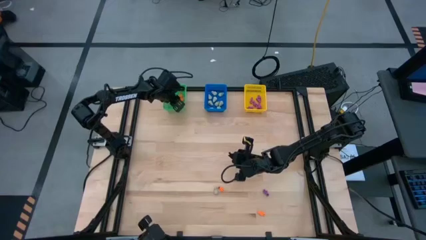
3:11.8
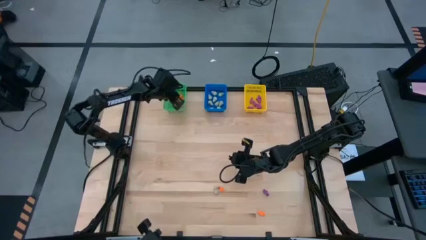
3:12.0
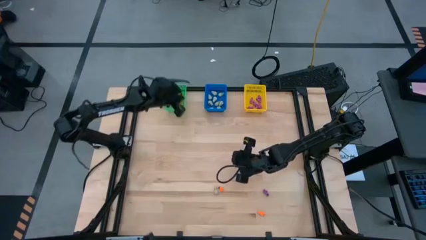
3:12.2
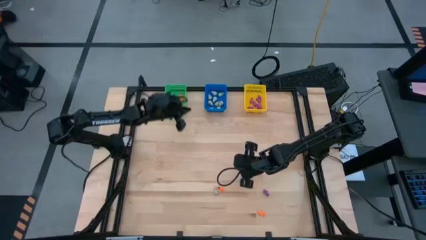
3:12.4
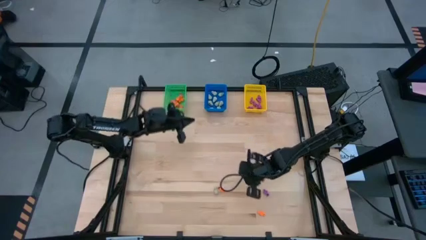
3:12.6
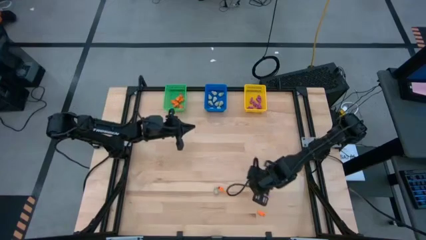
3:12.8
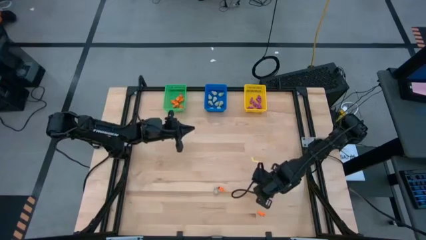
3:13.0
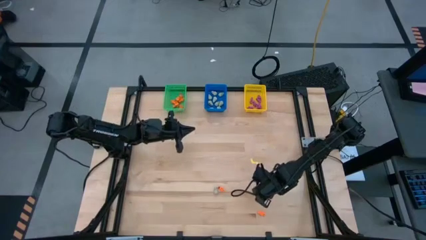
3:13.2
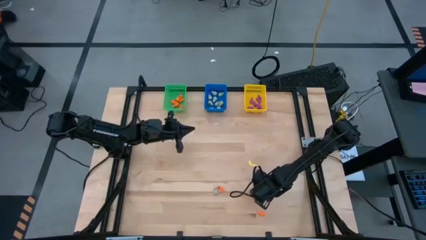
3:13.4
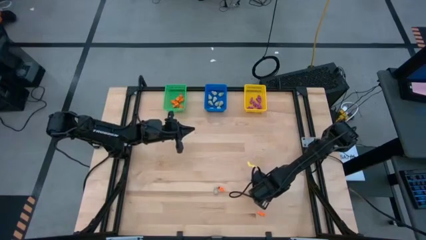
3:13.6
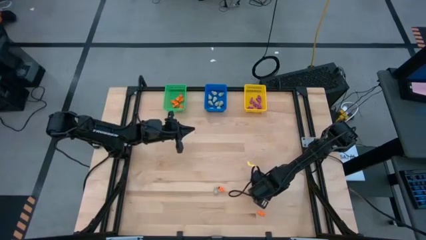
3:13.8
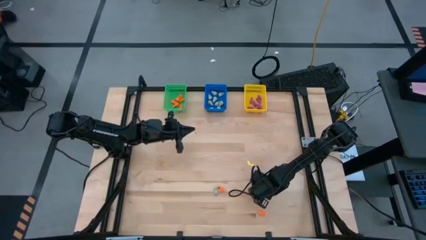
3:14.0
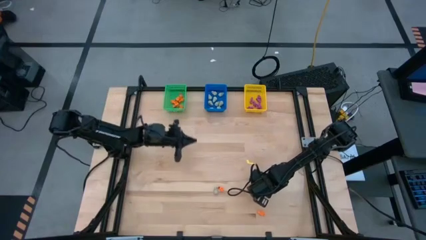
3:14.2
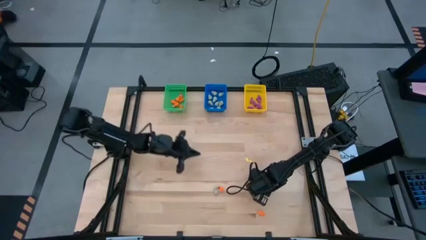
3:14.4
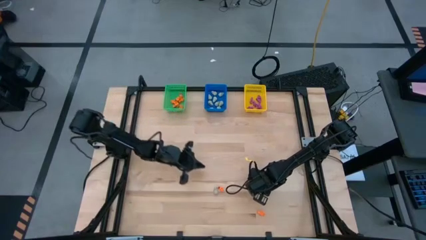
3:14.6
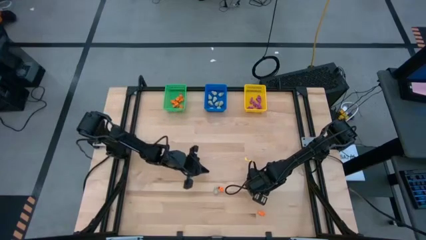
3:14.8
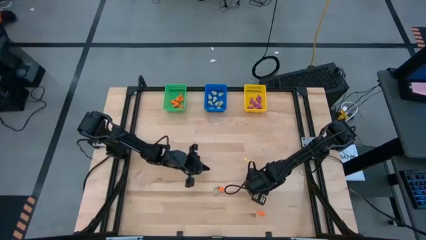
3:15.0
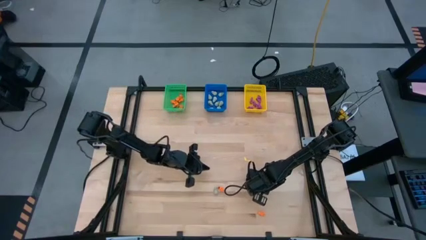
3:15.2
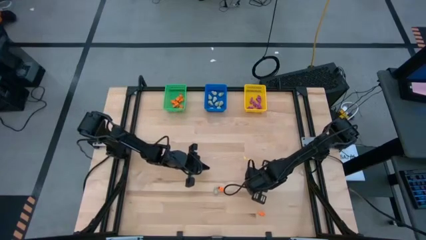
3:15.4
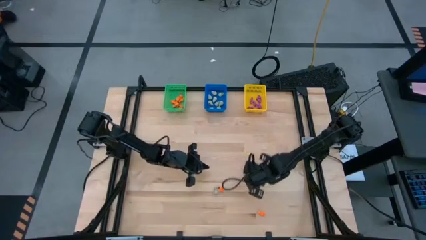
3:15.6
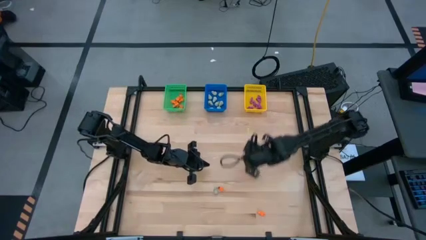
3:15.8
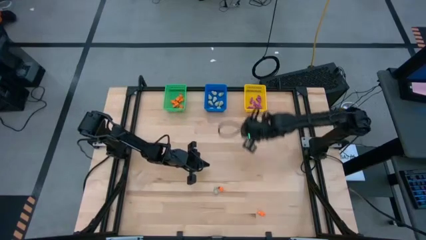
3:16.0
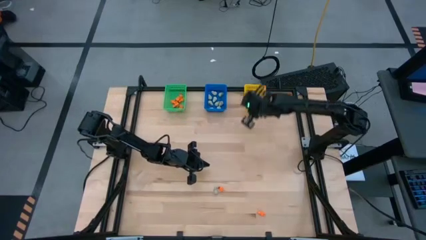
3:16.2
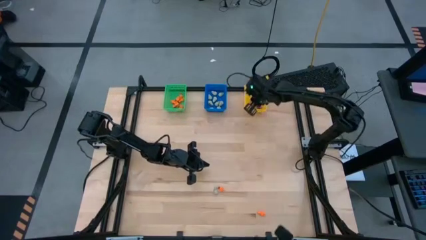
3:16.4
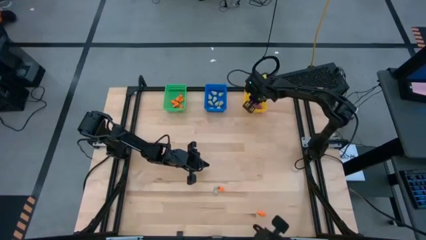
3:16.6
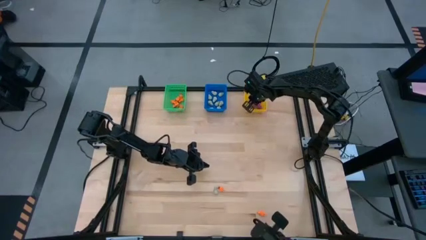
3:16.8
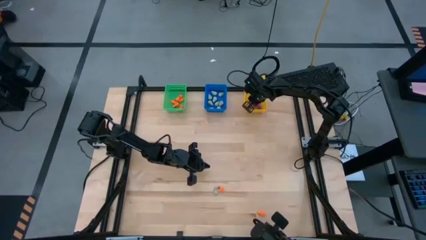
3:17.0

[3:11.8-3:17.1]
Task: Sort Halloween decoration
Put the purple skeleton toy into the yellow bin

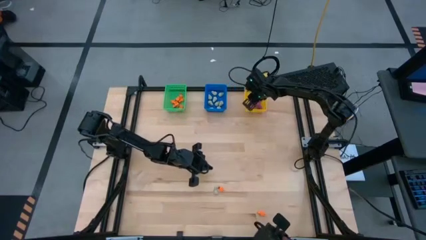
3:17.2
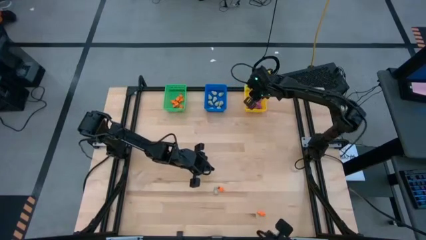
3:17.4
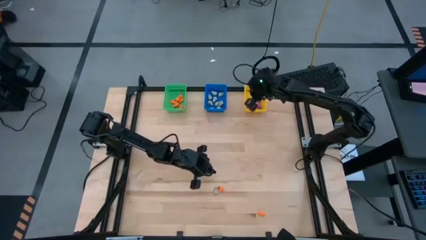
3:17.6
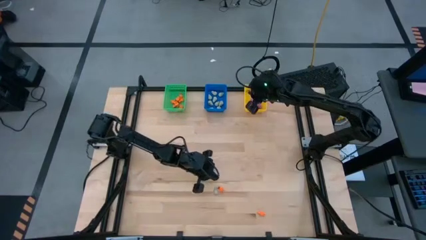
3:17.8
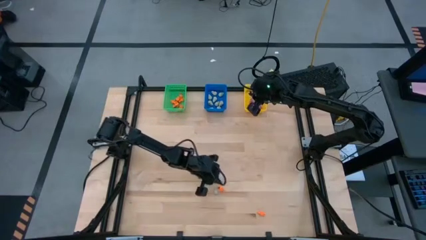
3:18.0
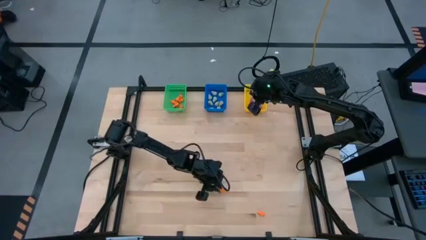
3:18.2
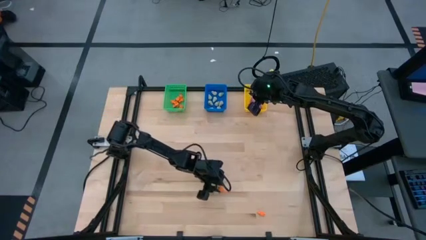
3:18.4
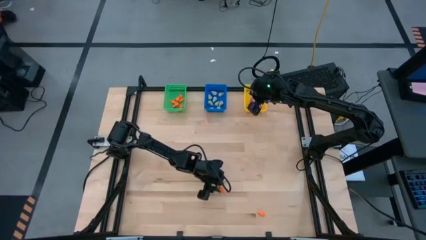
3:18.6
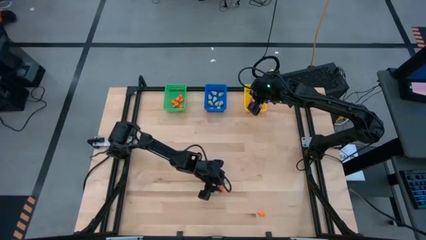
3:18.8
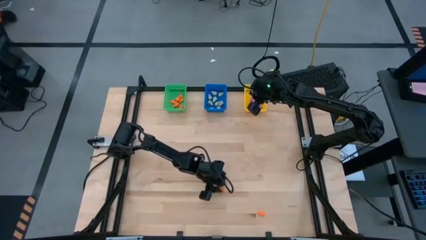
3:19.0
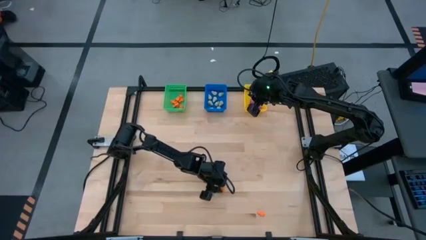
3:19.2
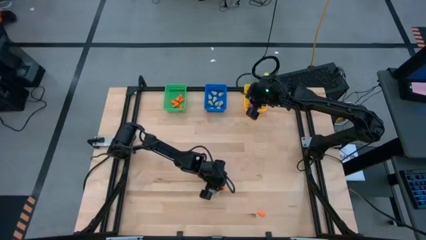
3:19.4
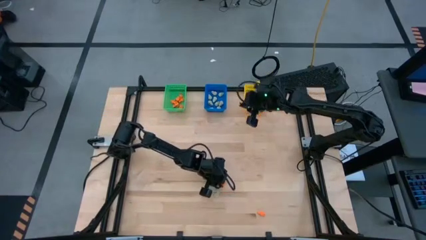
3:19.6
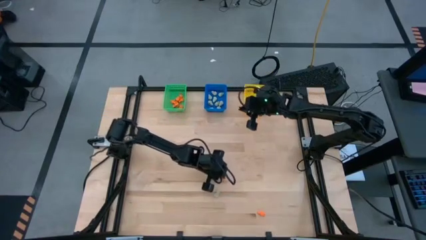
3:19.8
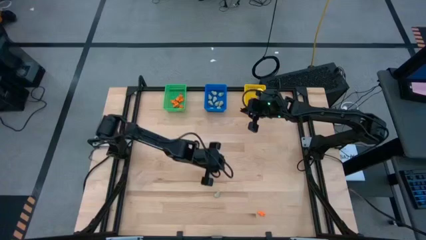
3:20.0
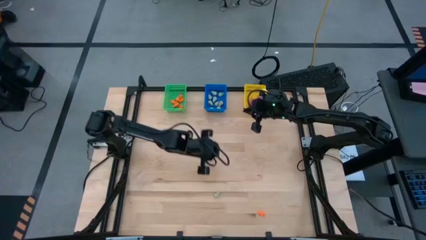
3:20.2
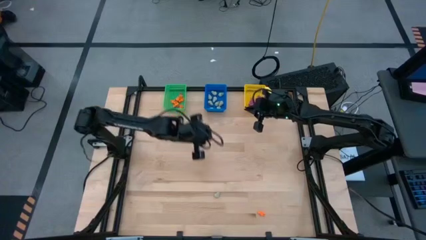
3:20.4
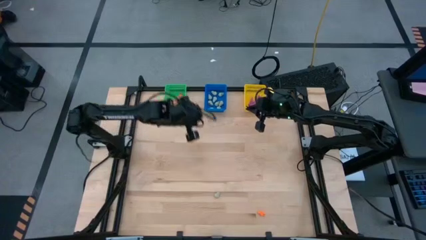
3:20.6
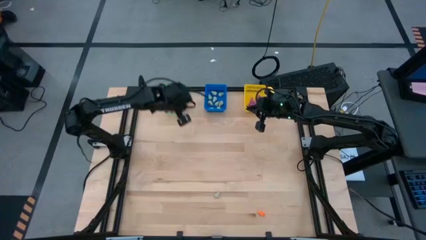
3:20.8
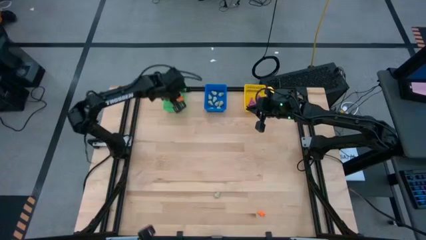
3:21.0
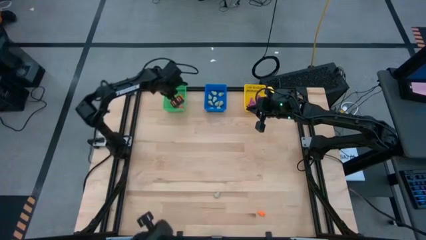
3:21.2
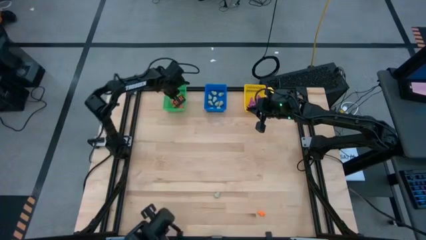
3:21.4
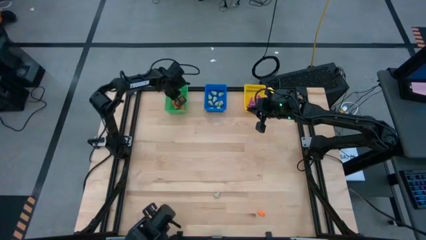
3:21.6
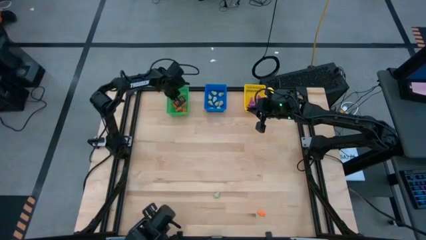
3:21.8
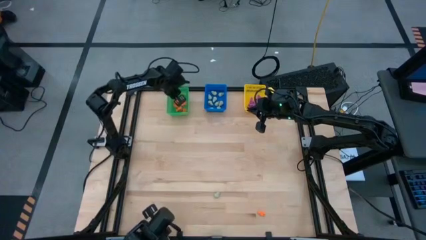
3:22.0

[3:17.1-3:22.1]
Put the orange skeleton toy into the green bin

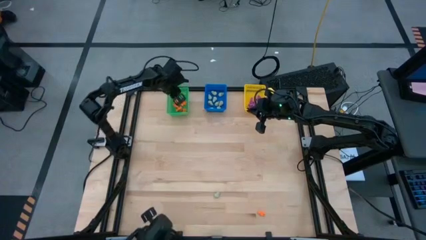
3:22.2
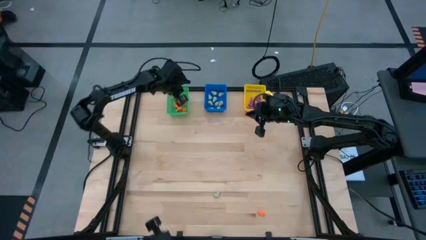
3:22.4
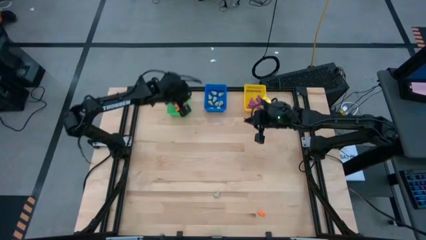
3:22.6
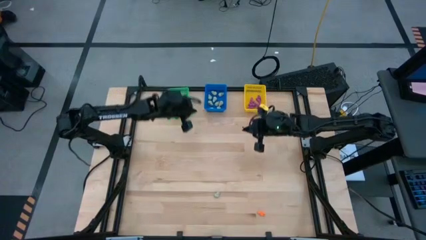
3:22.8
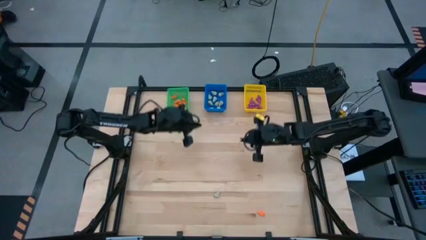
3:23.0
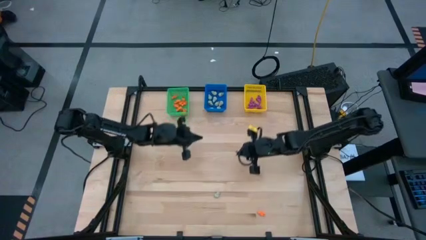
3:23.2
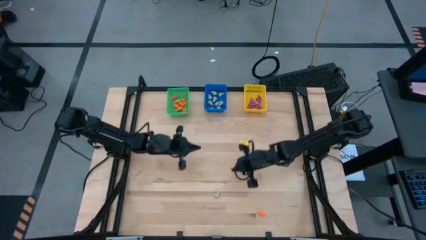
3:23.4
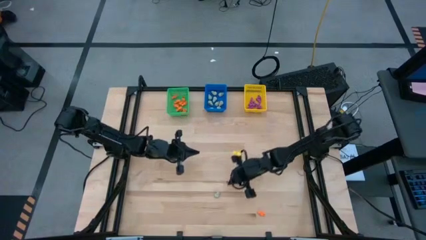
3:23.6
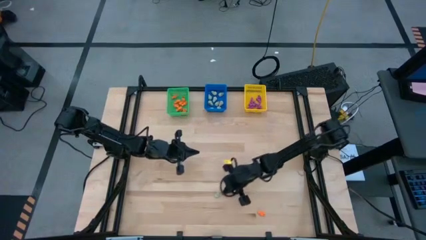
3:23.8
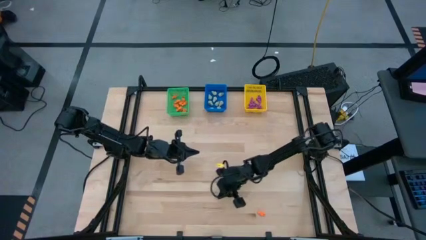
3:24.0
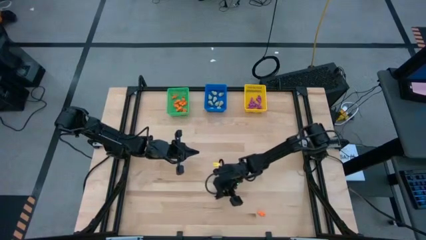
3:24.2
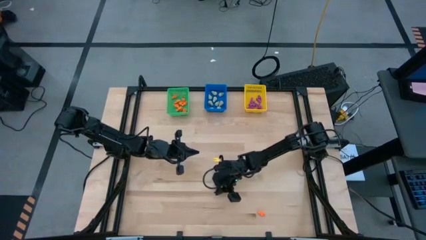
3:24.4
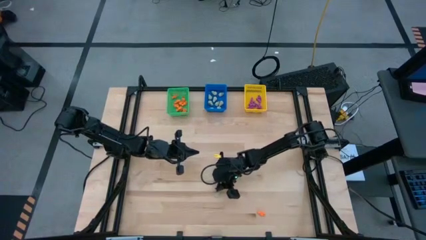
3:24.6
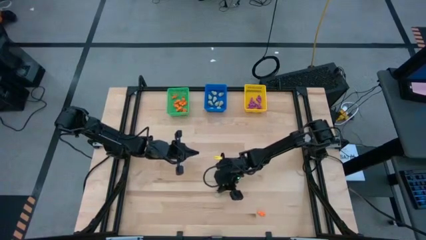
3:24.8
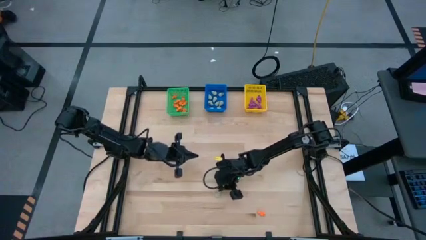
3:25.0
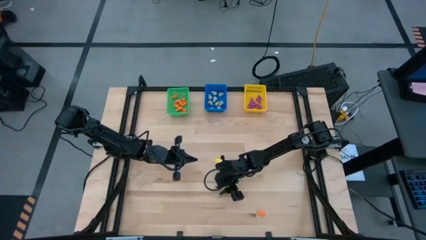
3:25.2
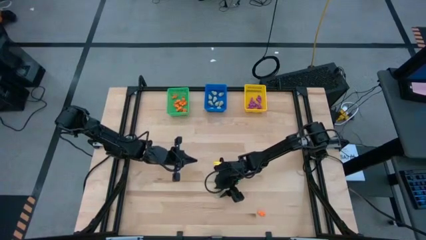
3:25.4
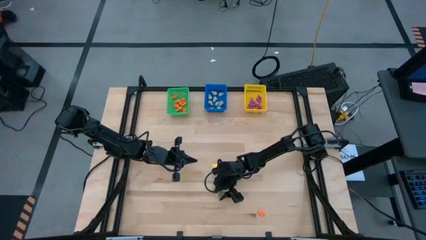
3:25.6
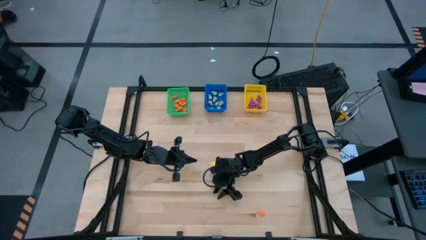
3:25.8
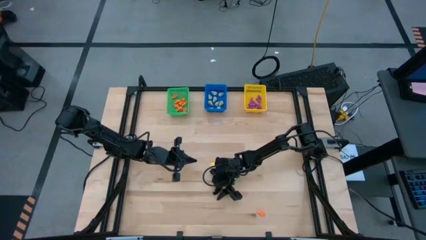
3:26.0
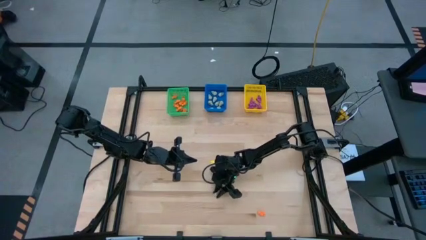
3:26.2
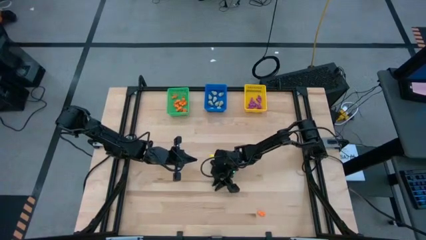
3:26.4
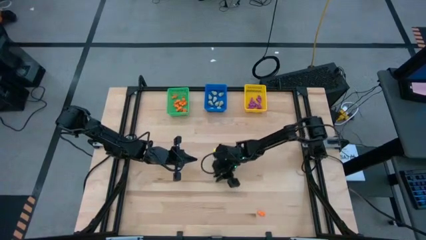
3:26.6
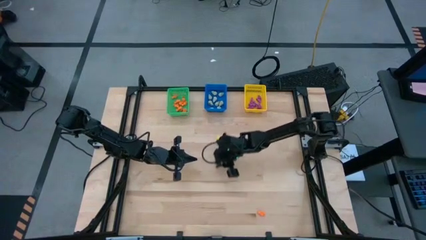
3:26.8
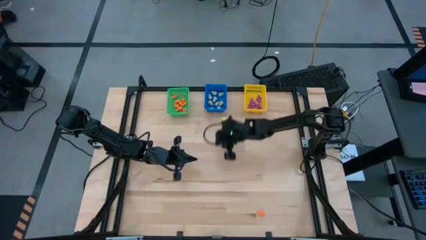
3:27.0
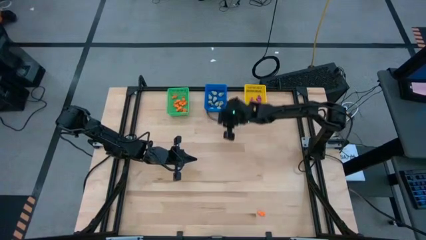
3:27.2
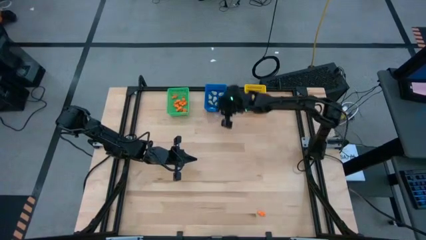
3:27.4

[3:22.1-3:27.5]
Put the white skull toy into the blue bin

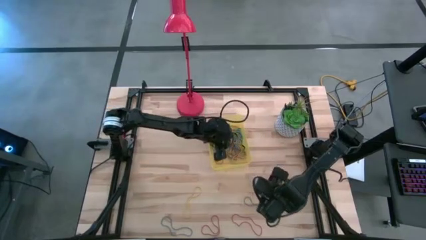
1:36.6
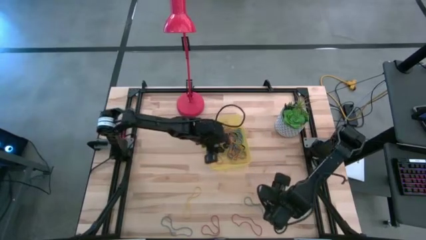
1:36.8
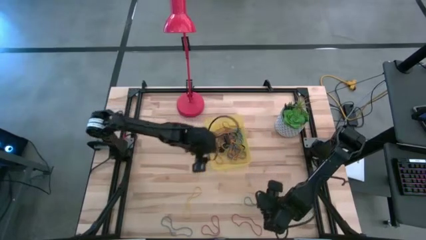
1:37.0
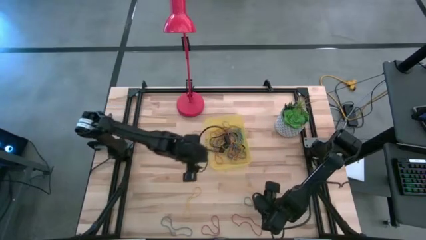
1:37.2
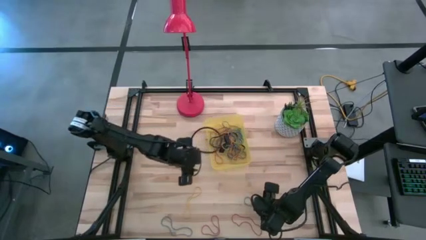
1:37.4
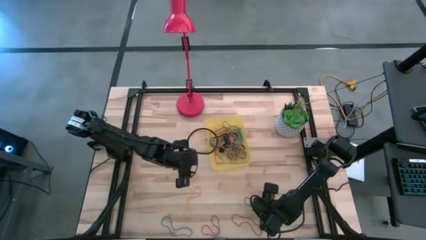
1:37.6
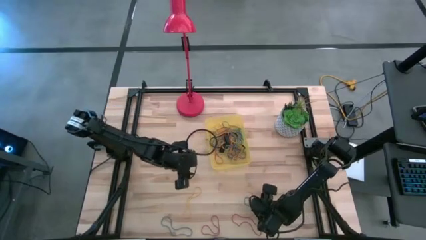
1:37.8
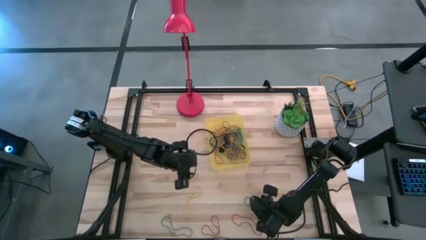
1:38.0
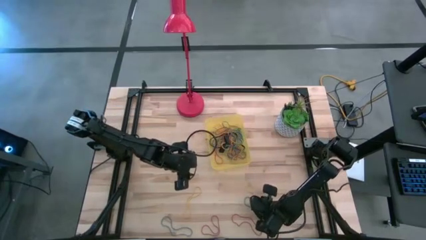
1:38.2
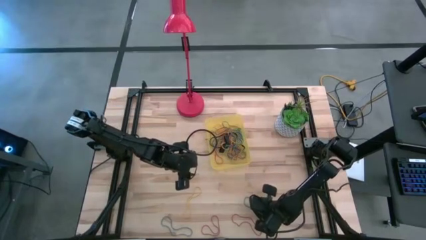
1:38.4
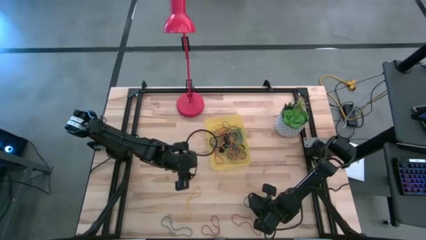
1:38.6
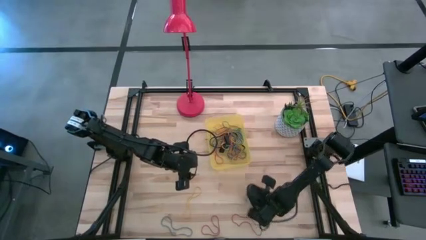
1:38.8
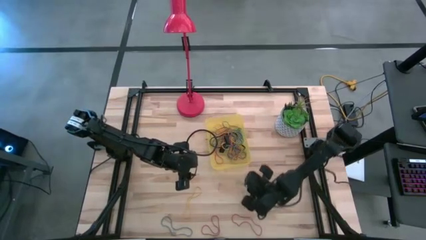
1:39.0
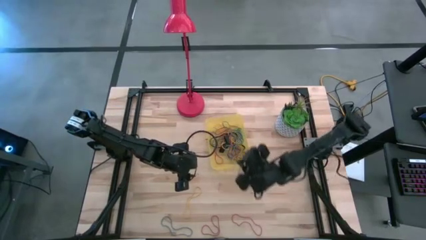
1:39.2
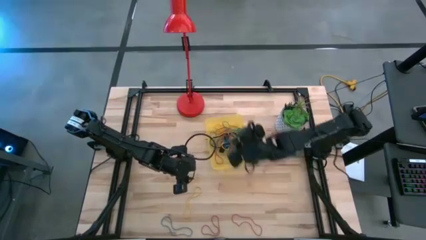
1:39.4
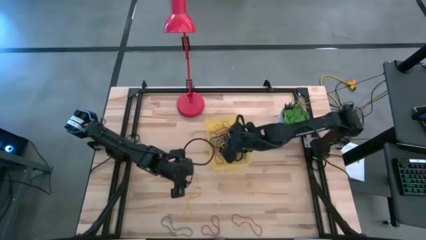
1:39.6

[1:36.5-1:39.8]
Task: Pick and place rubber bands into bin
Put the blue rubber band into the yellow bin
